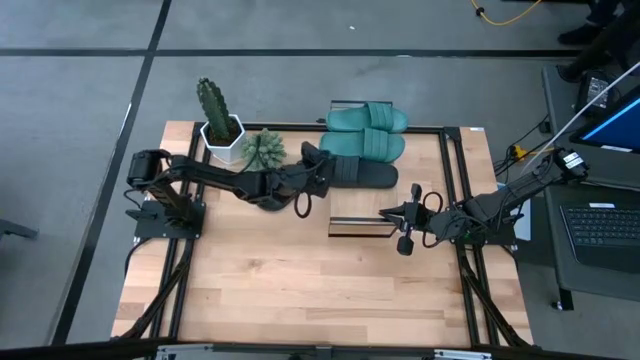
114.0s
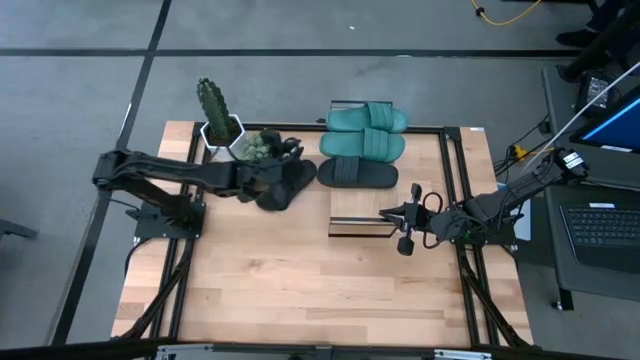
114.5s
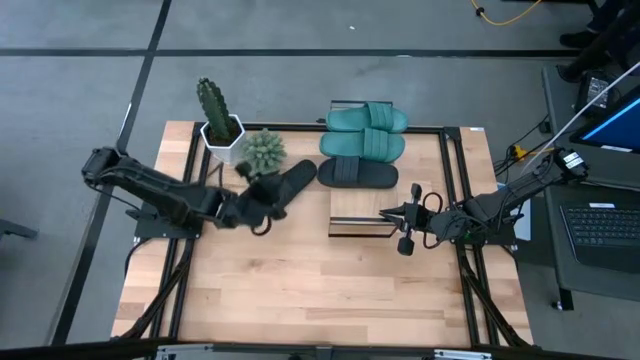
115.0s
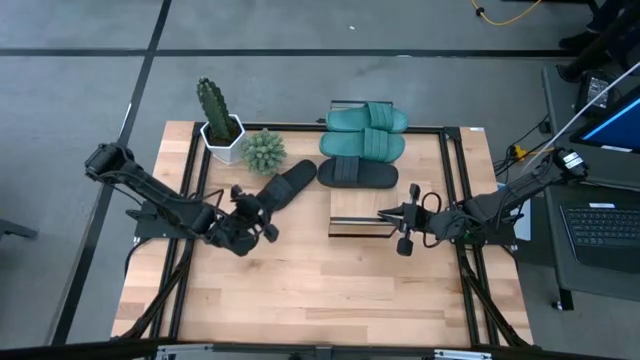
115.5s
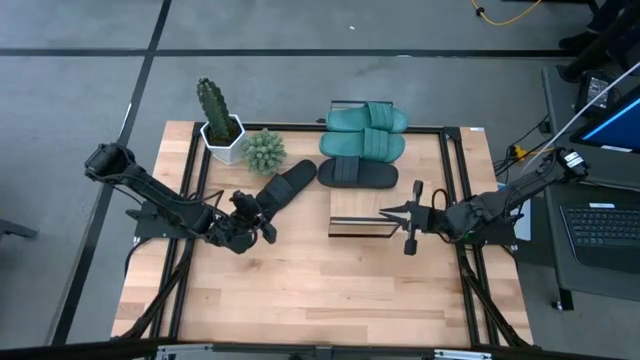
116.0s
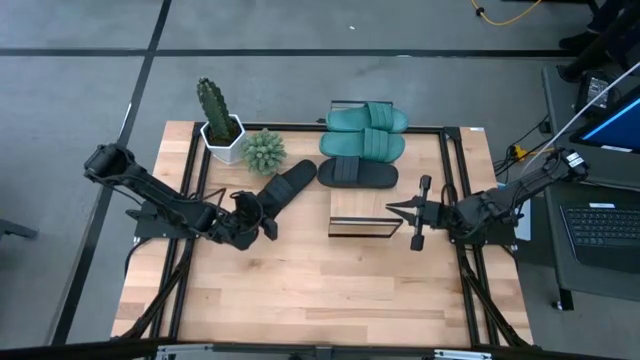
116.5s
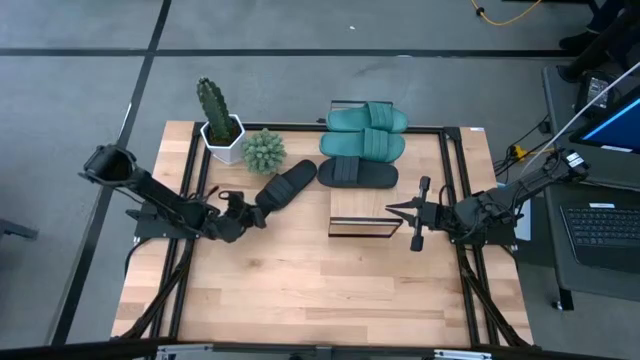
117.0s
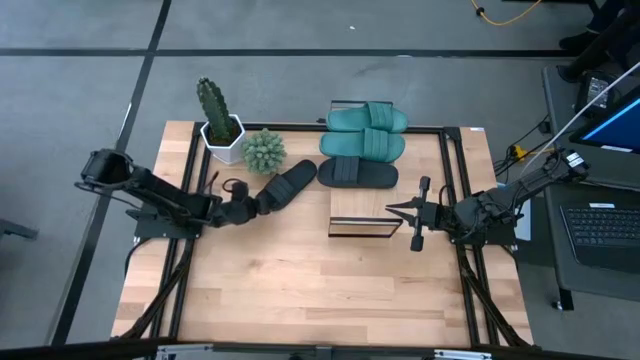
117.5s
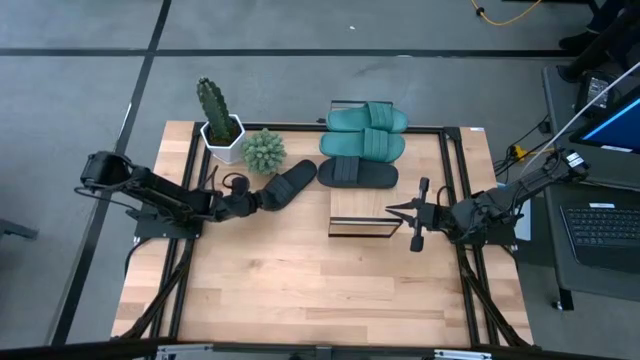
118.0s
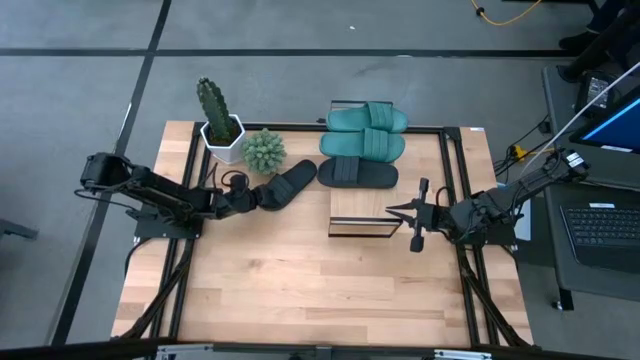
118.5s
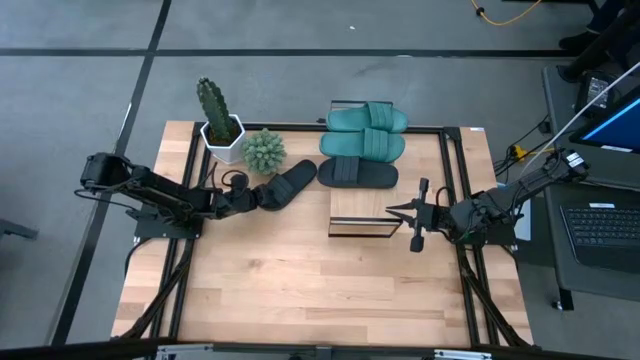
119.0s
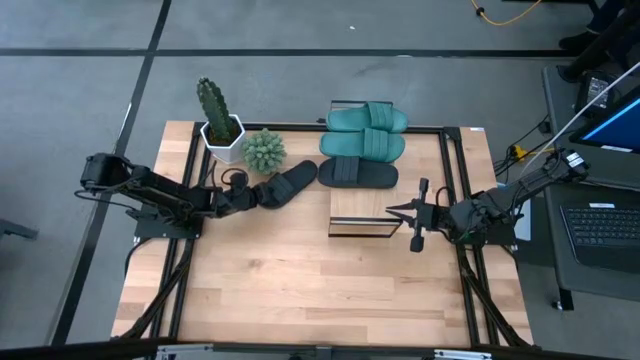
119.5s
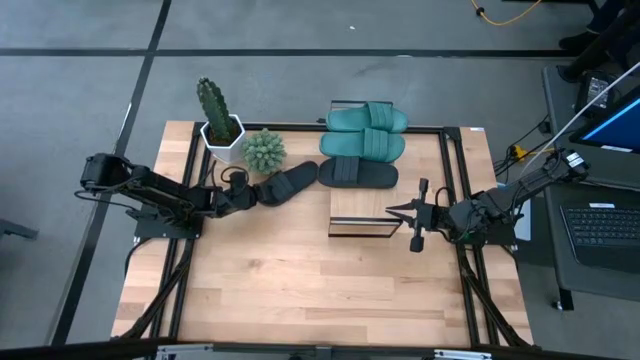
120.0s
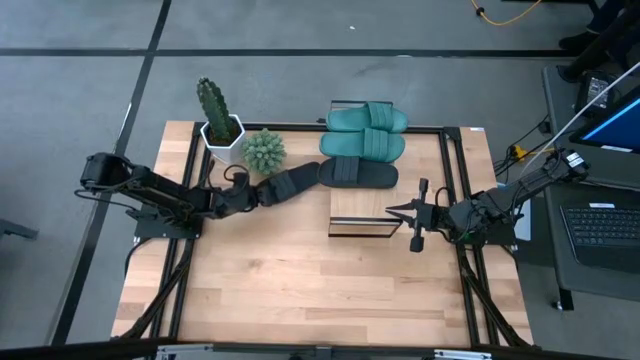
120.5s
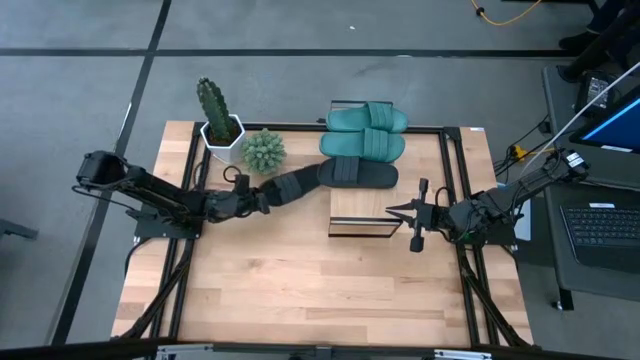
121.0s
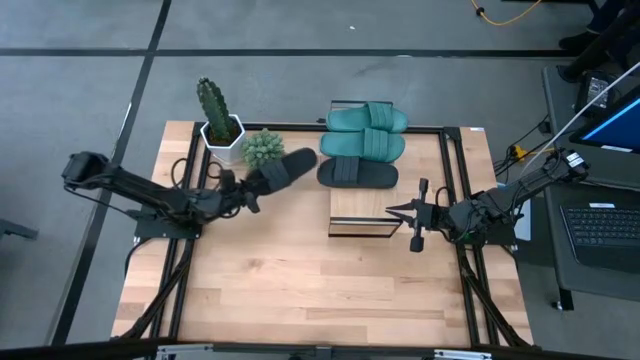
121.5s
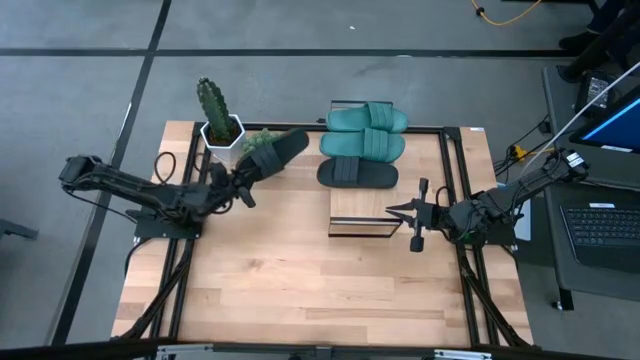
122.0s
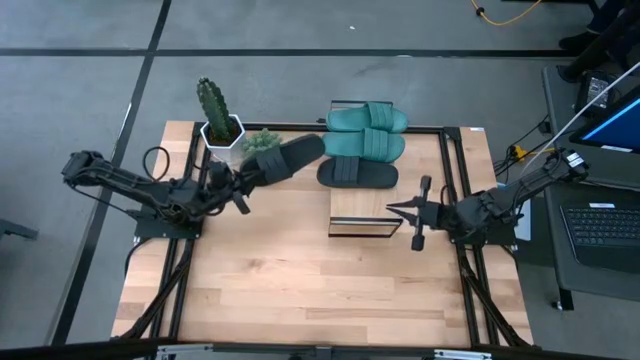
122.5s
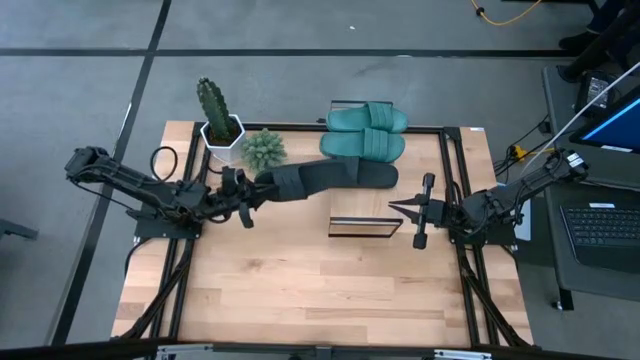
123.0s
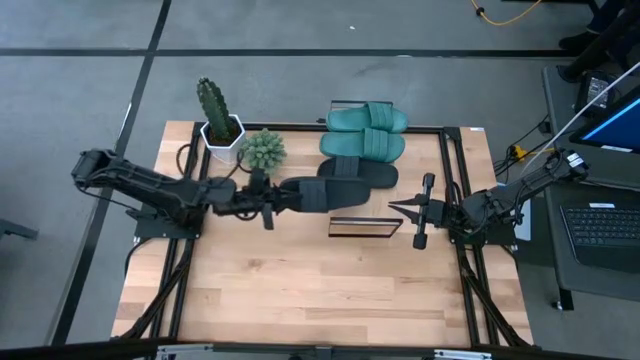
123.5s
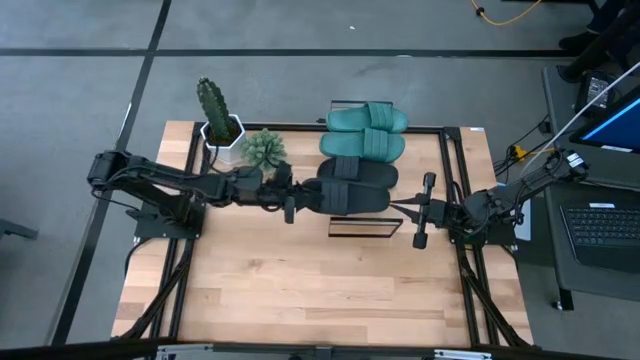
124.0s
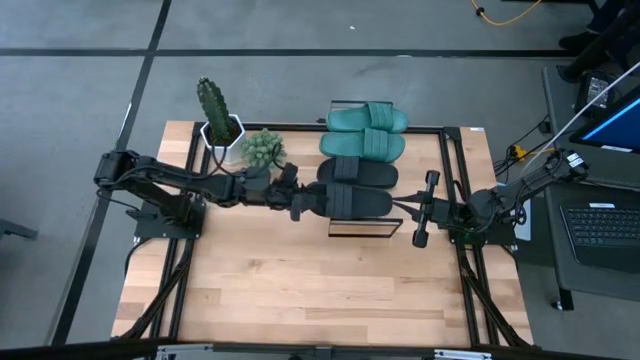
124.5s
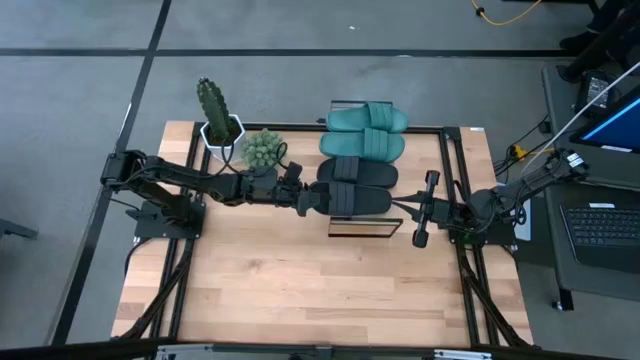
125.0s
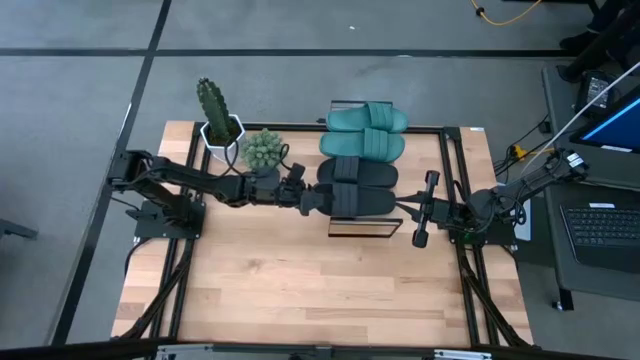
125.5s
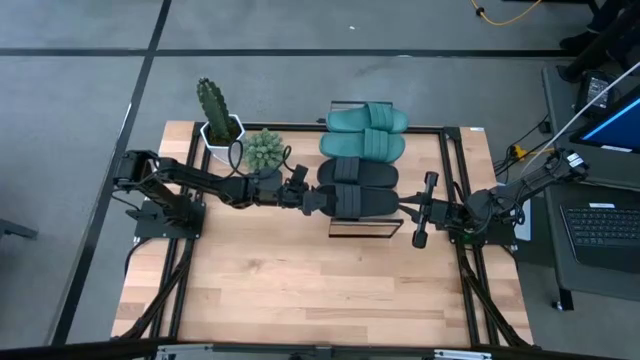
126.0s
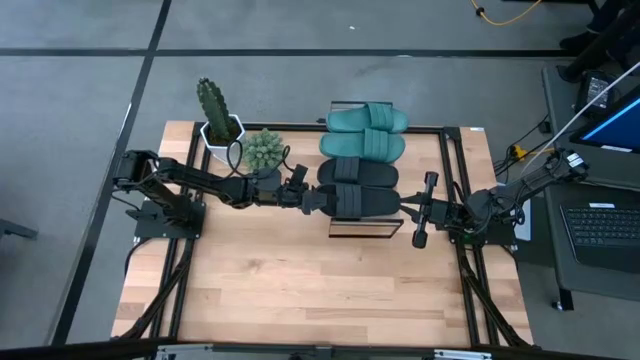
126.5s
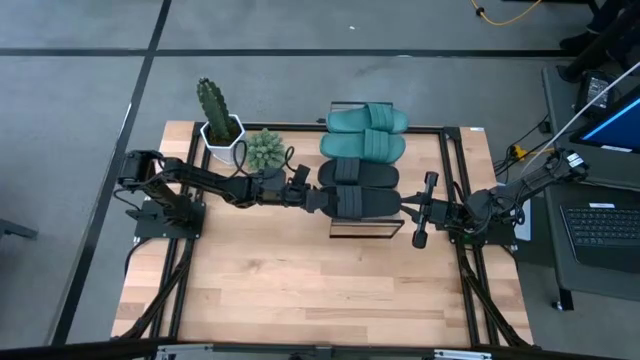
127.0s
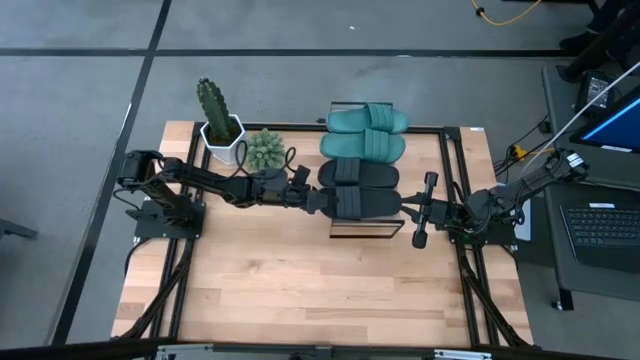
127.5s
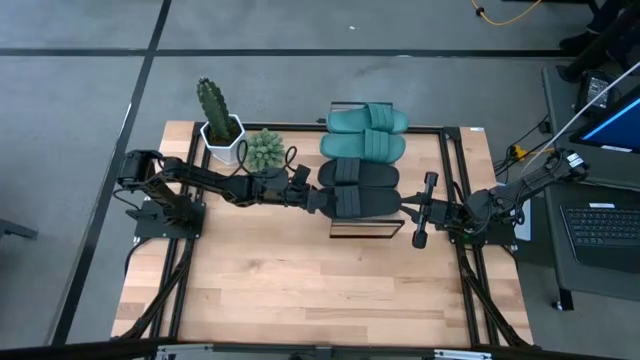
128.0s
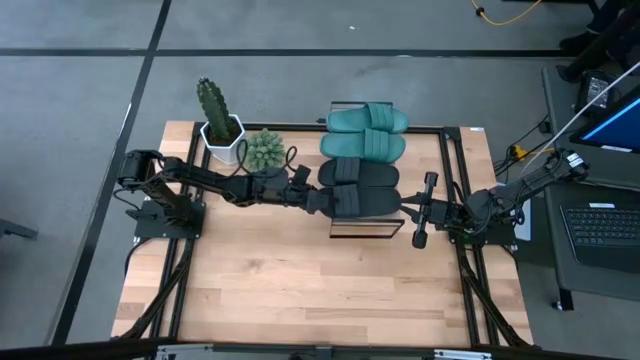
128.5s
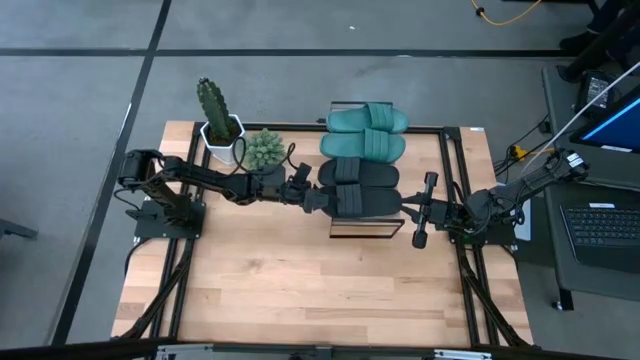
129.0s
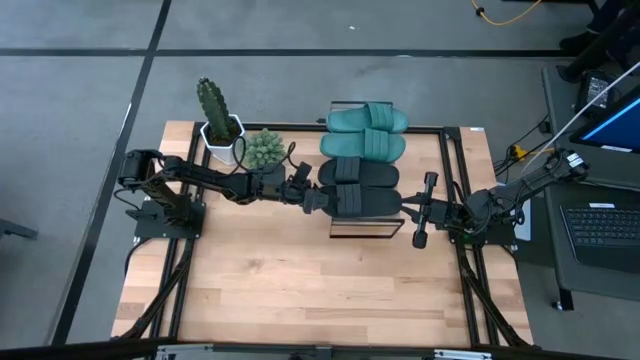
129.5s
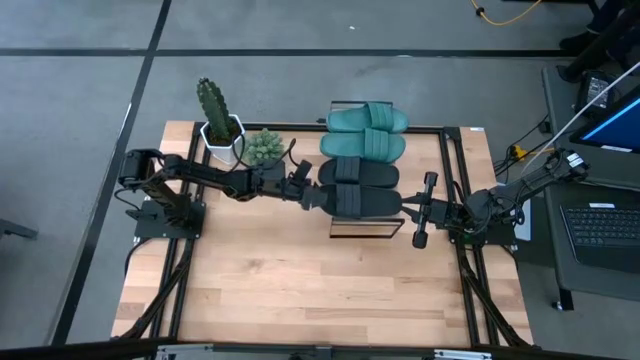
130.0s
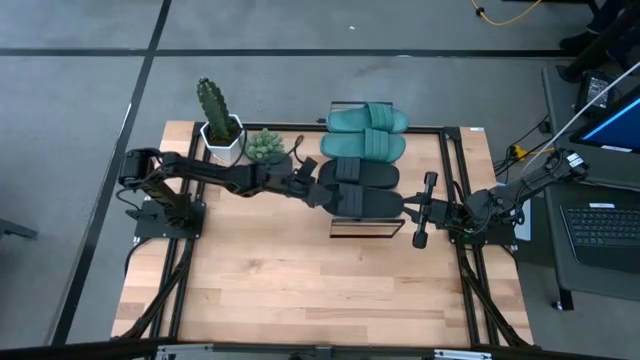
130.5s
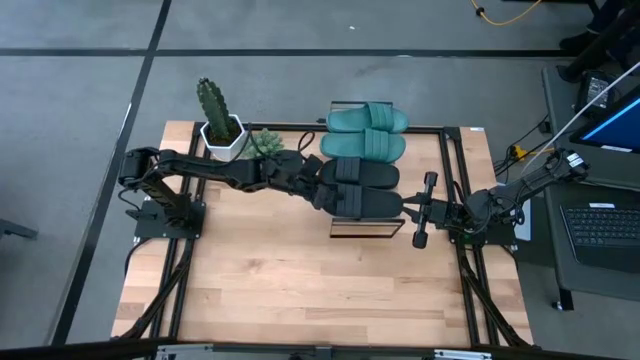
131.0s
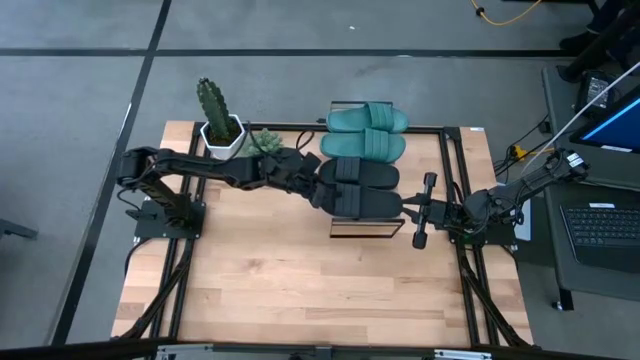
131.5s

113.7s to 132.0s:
Task: Pick and place slides into the shelf
Put the black slide on the shelf

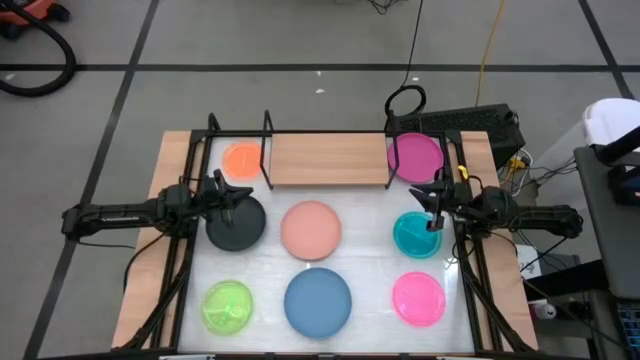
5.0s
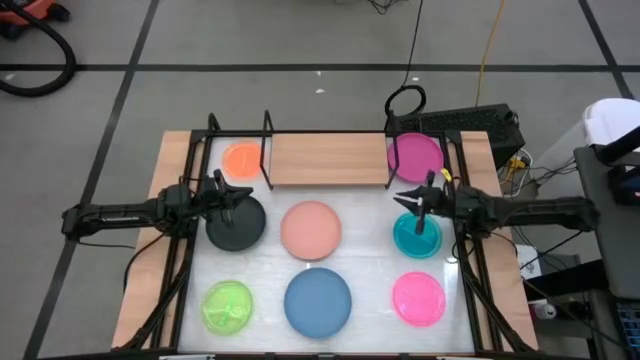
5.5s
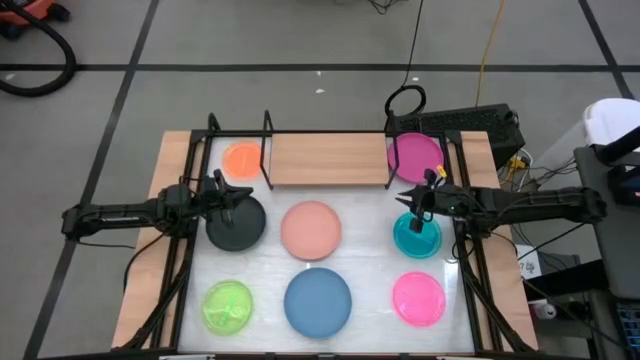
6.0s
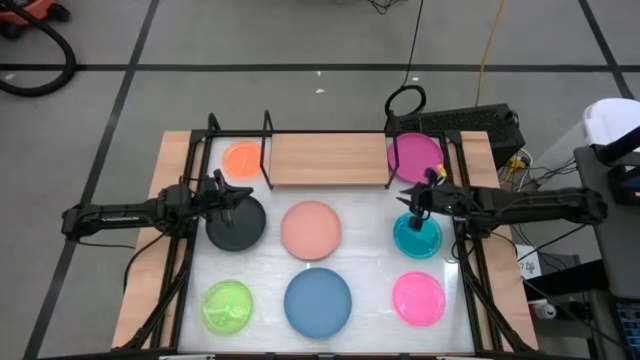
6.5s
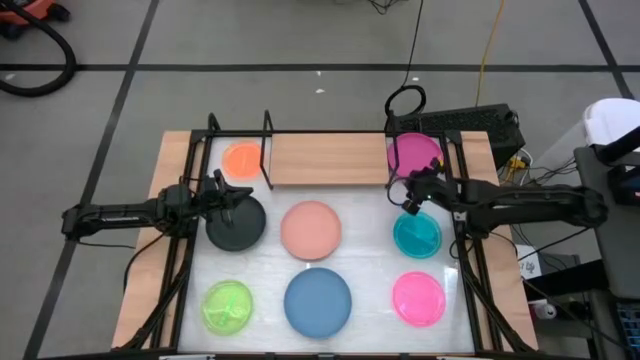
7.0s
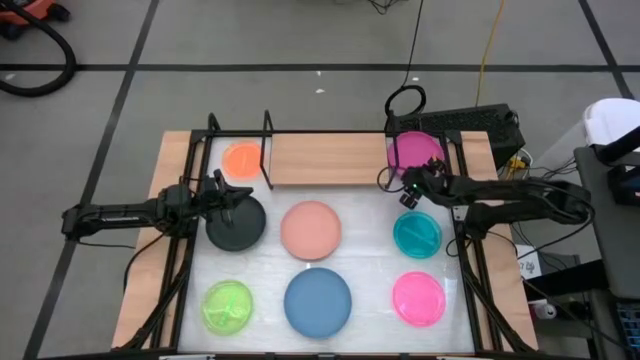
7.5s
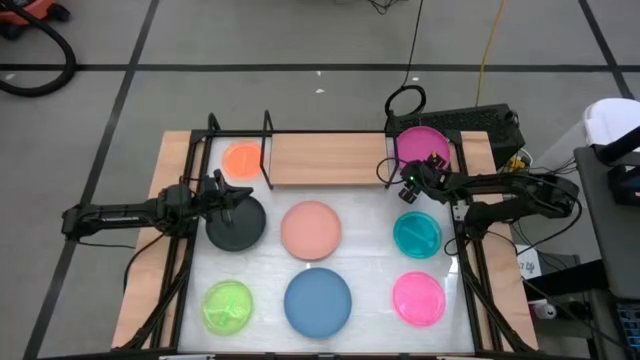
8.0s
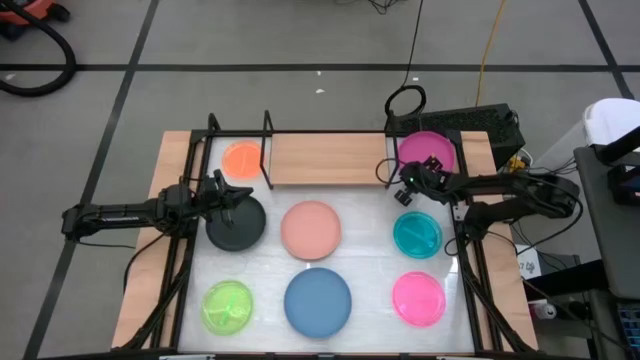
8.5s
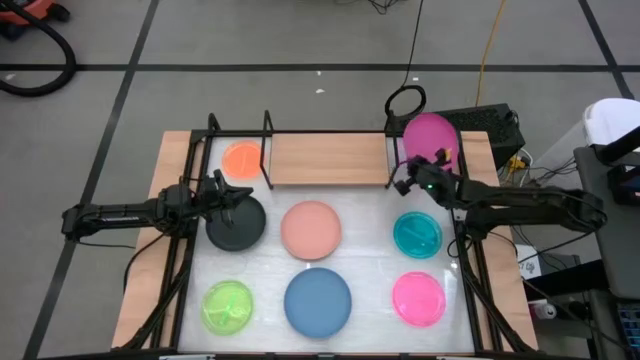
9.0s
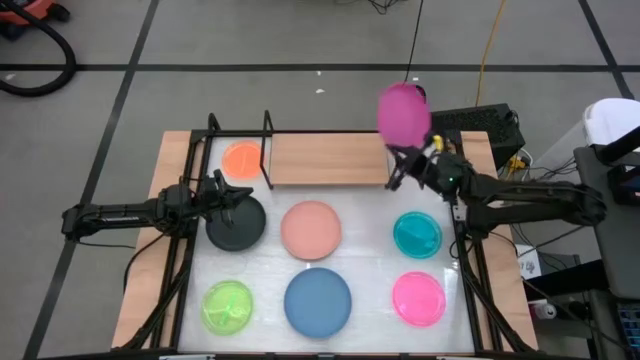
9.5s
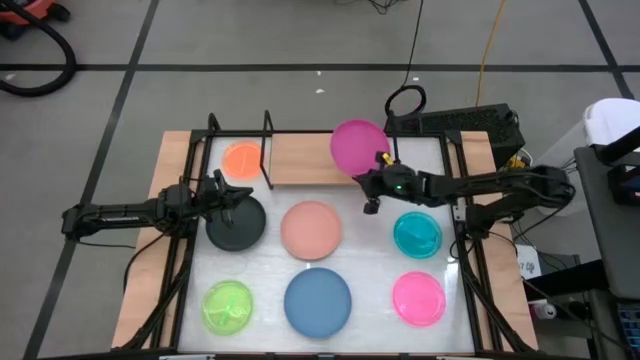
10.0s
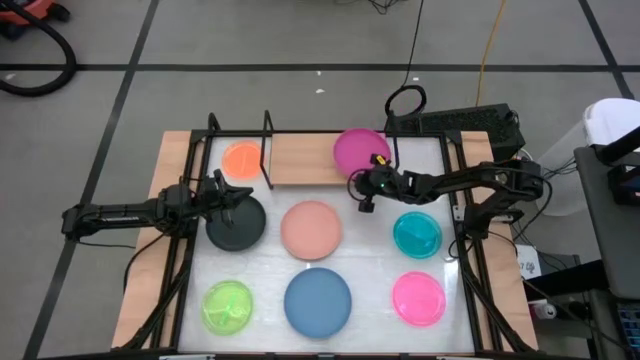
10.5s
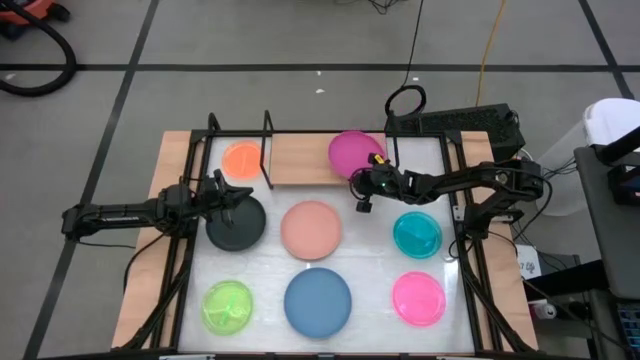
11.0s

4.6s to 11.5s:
Task: Place and stack plates onto a shelf
Put the pink plate on the shelf
